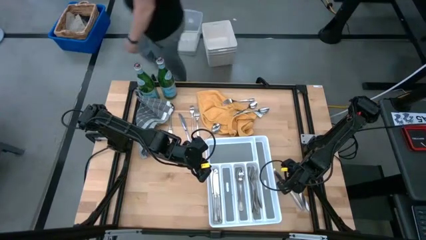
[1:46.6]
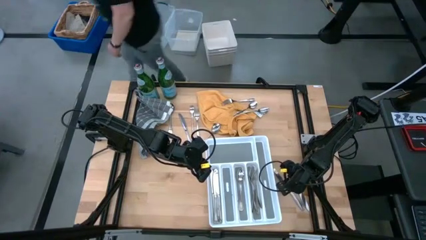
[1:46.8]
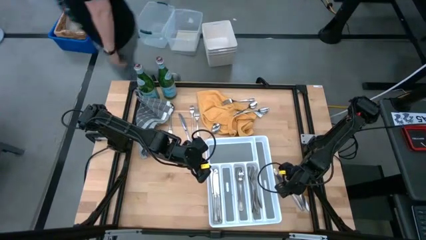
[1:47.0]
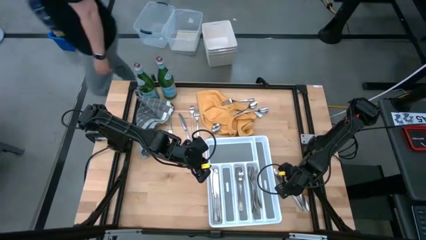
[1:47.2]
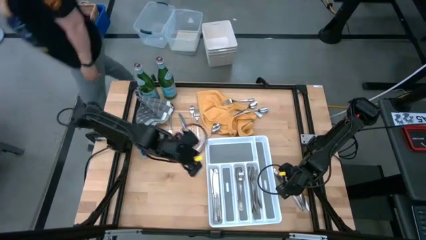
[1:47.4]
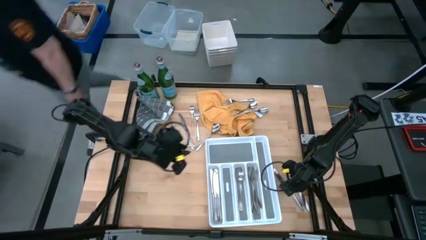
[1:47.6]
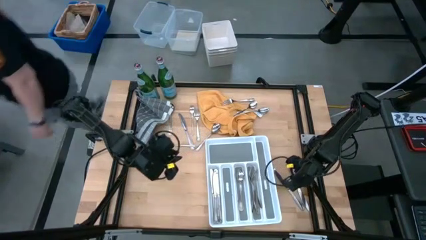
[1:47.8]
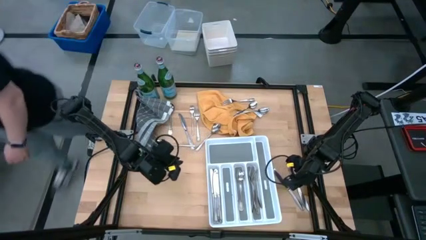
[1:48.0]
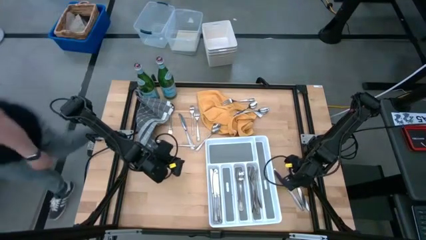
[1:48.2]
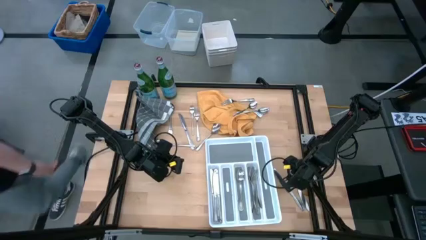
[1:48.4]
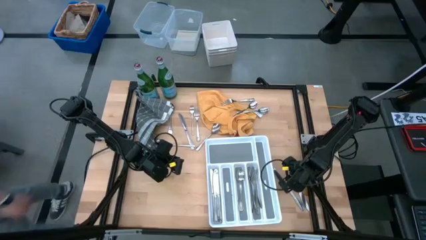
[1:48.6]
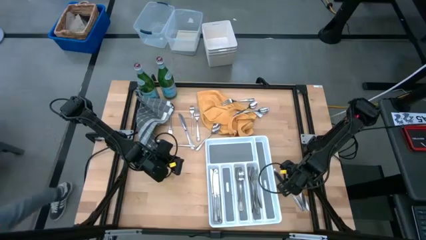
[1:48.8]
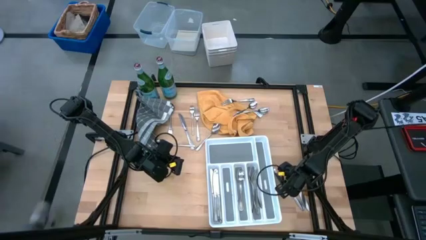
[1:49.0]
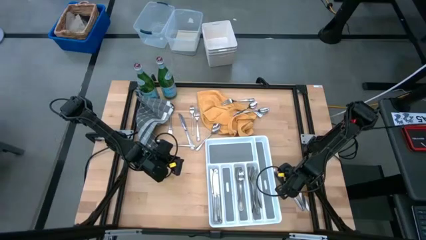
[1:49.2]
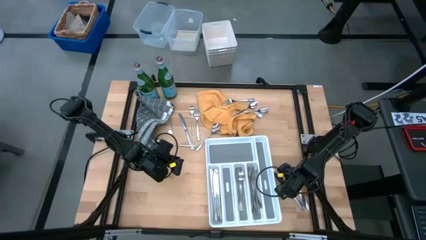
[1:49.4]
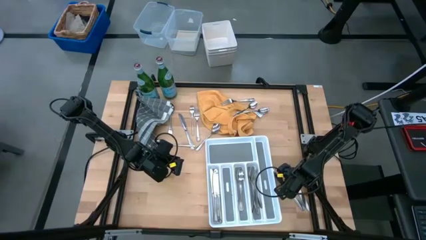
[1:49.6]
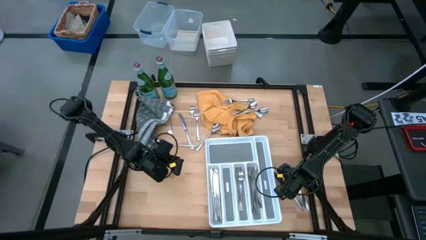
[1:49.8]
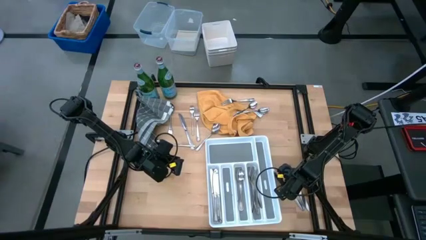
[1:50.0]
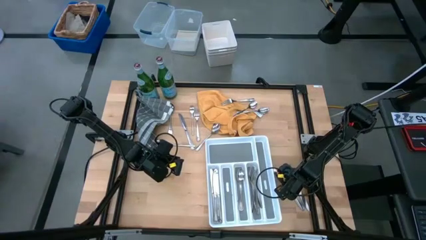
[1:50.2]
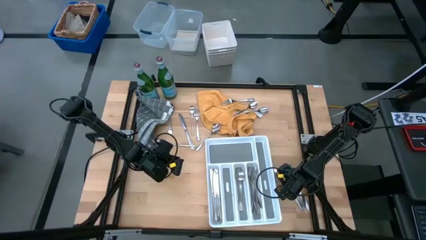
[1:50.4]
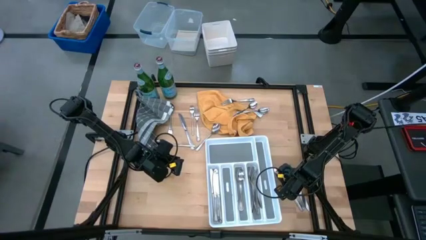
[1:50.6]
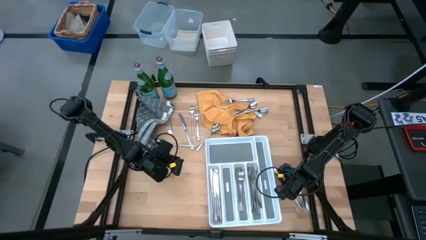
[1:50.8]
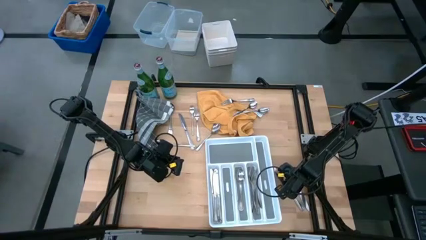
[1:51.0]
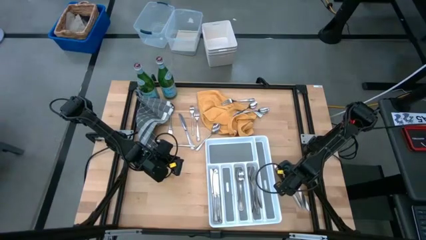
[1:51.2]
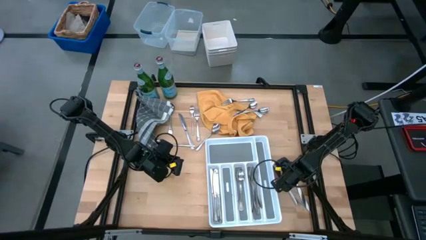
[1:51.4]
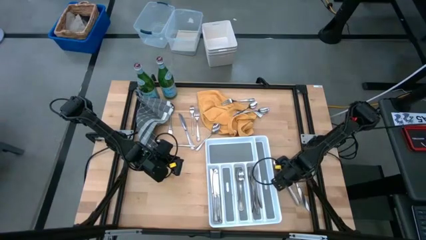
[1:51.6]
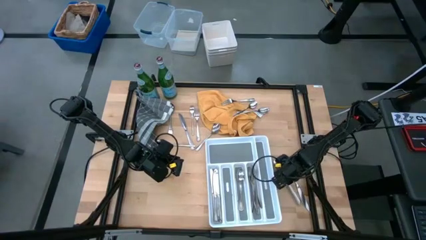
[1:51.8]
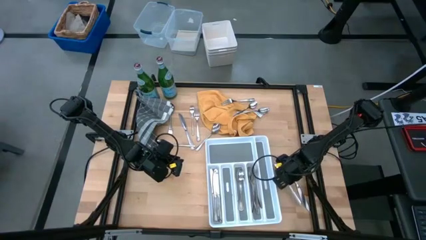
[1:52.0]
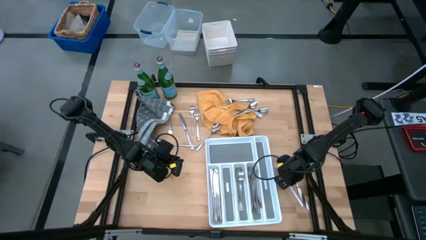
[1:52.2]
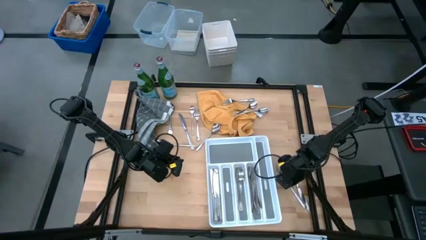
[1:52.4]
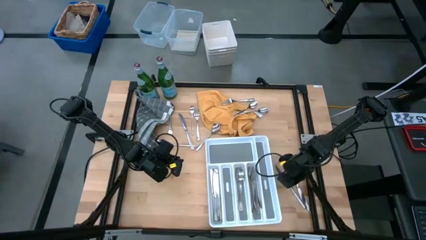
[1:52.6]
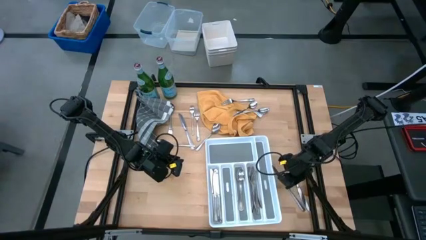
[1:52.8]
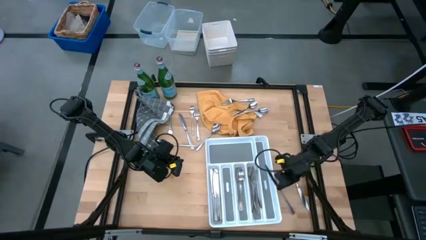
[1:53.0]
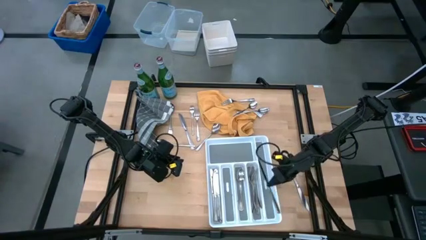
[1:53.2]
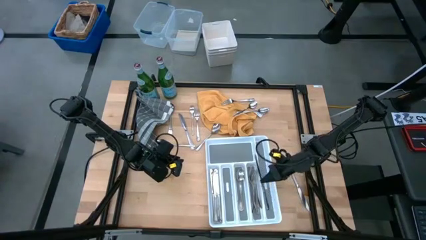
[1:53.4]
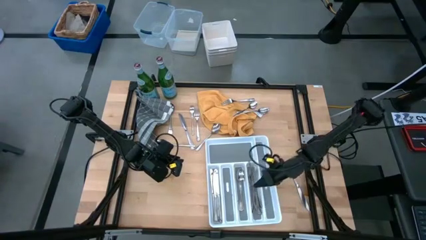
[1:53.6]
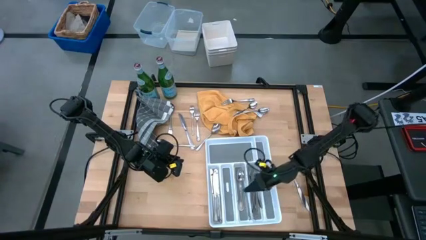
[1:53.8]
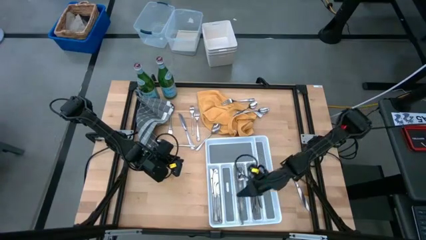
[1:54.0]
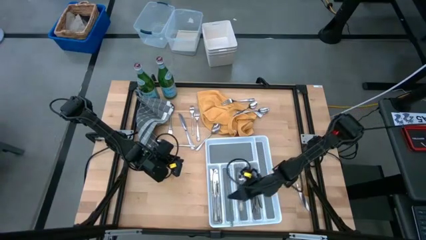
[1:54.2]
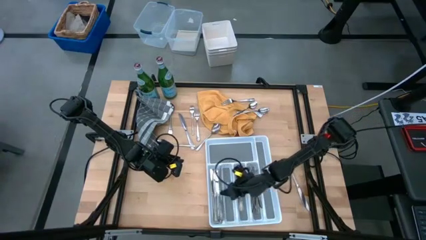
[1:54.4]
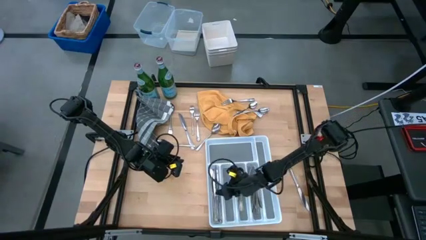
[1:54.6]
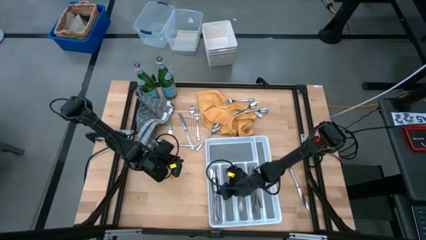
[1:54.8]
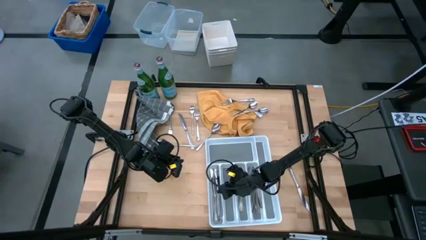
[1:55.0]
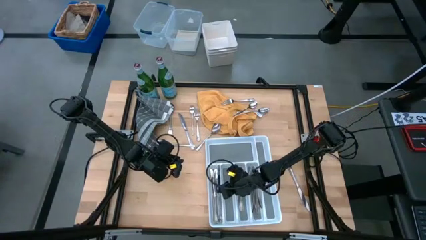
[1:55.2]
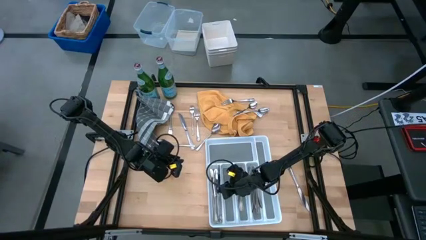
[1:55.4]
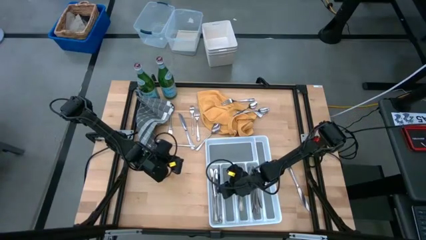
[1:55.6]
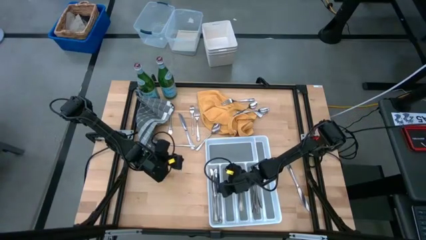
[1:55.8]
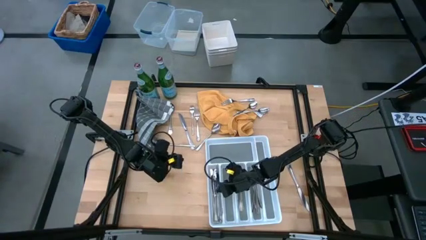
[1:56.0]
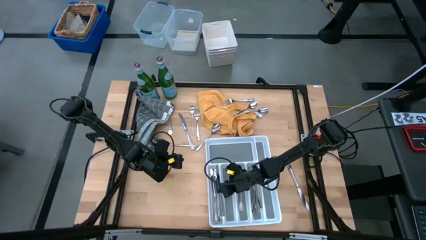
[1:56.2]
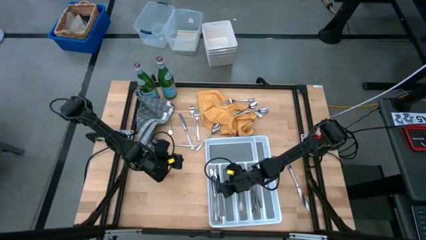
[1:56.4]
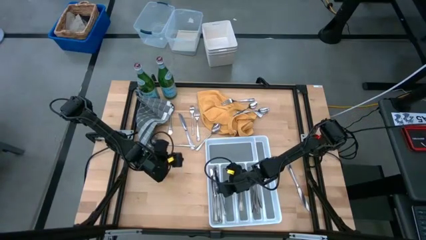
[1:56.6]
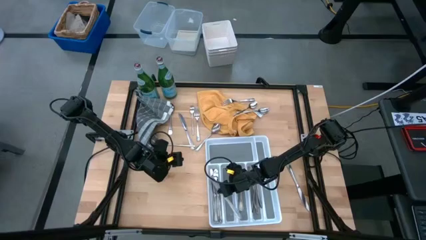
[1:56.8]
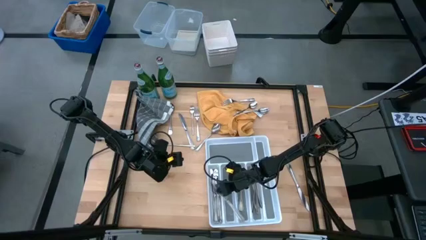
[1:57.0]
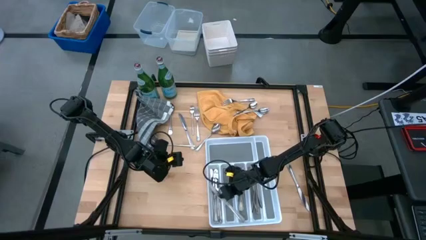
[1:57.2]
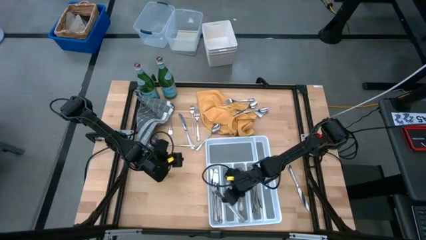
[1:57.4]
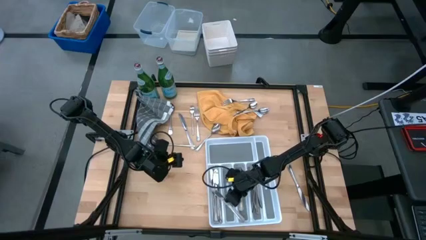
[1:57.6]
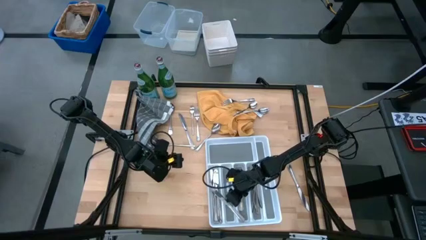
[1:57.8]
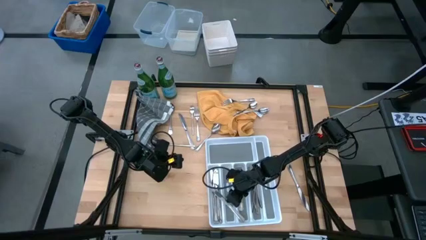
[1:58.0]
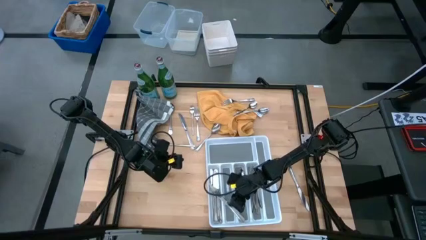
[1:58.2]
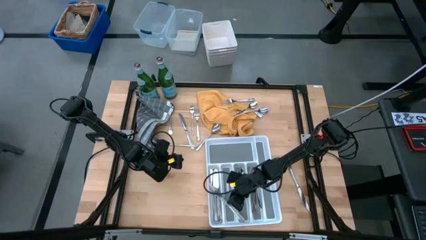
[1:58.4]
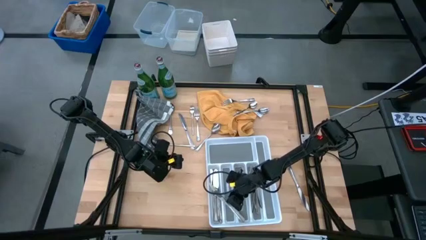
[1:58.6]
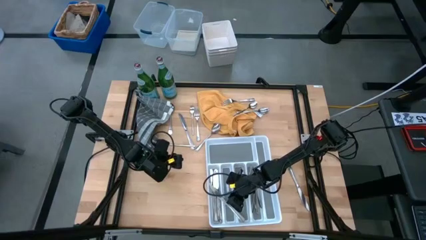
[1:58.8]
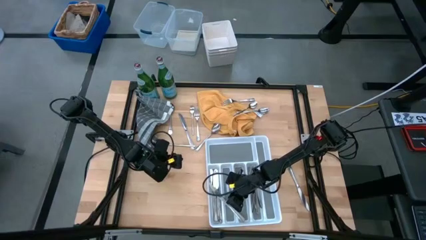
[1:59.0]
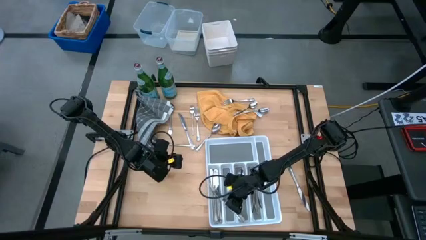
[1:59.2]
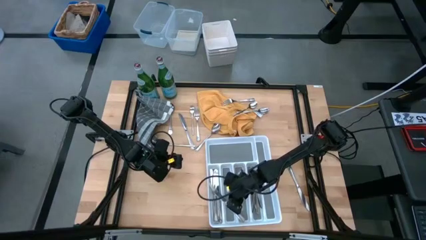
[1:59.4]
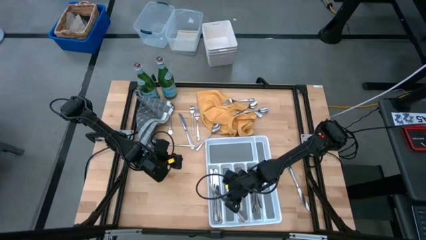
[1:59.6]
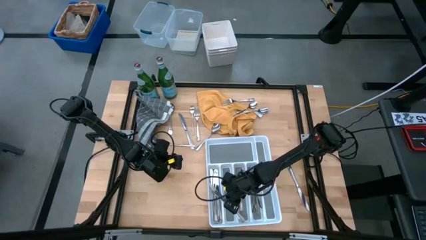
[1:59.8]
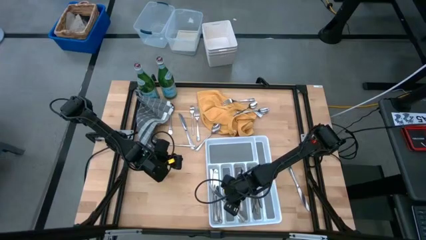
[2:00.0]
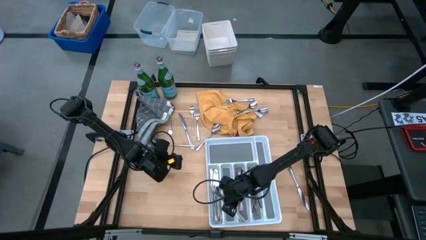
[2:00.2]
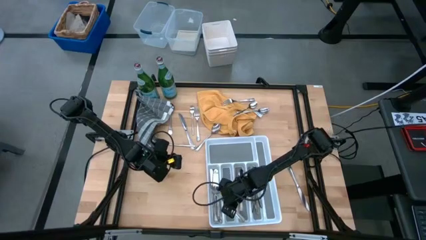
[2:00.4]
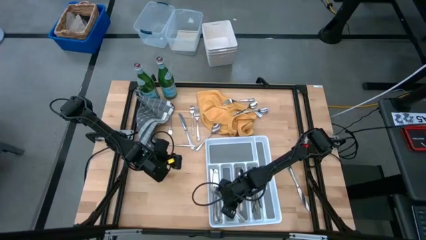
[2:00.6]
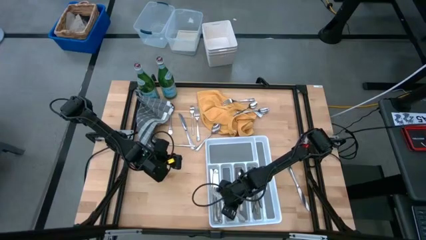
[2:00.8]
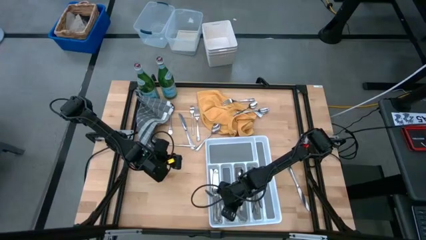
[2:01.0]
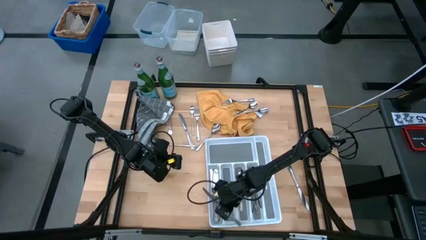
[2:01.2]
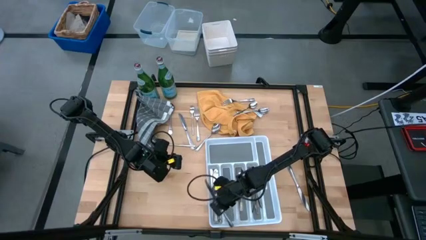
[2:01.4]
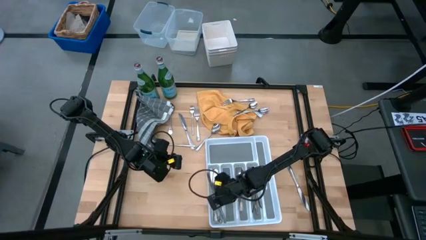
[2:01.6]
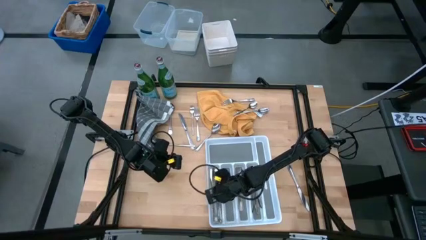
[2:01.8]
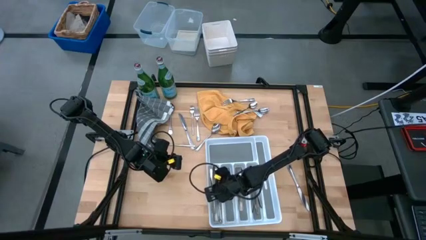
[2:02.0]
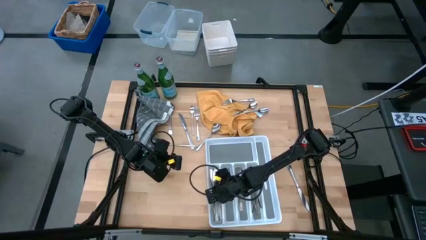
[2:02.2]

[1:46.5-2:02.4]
Task: Sort silverware
Put the table knife into the silverware tray
